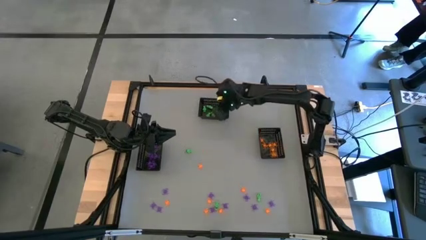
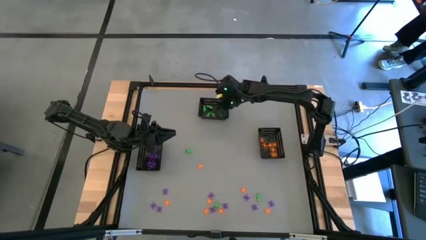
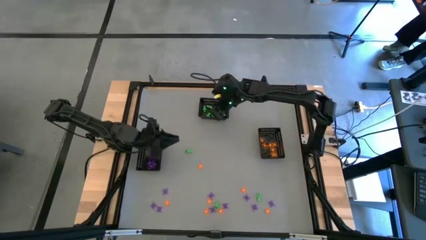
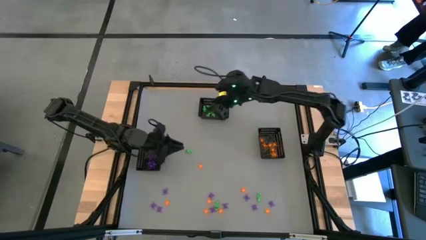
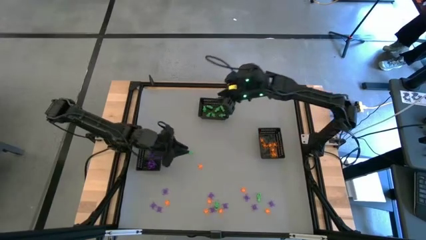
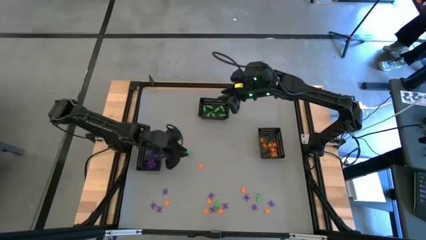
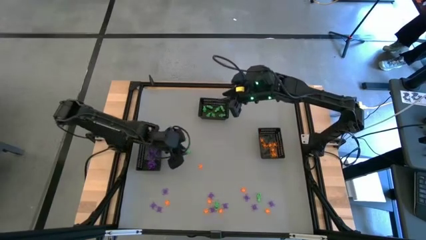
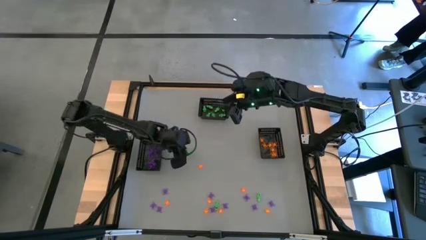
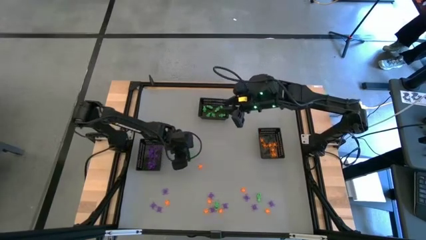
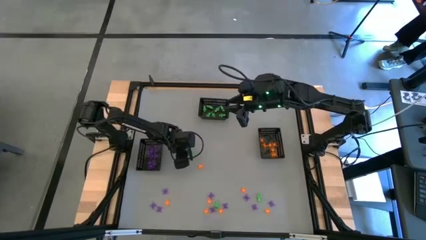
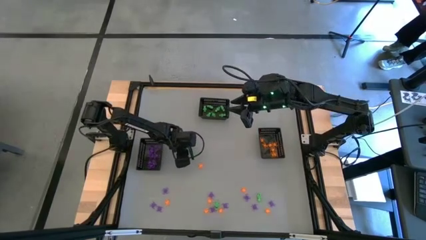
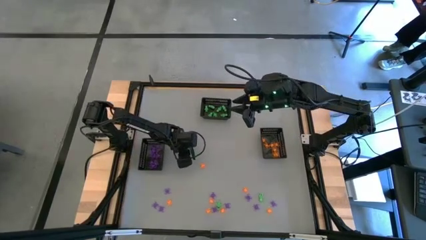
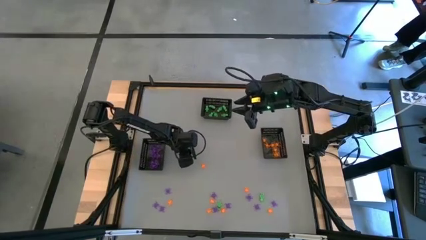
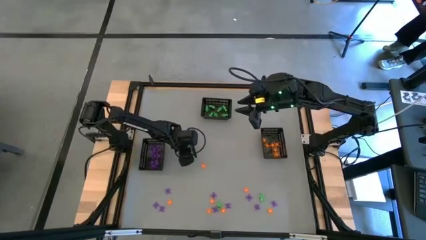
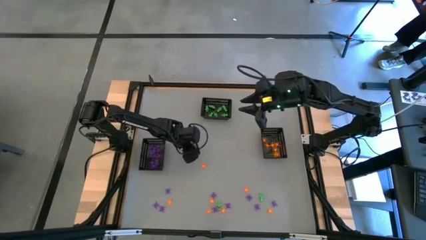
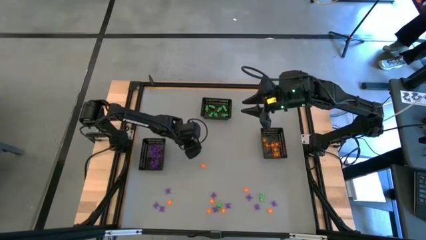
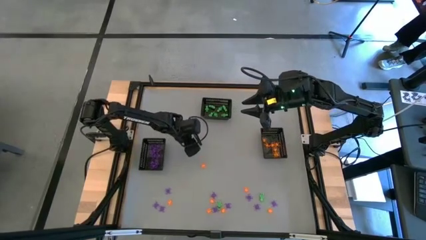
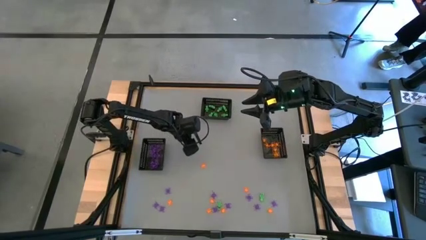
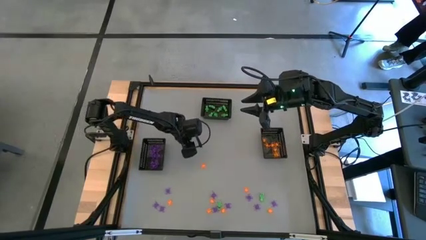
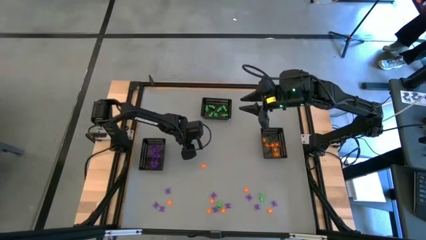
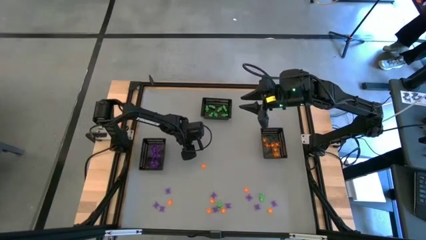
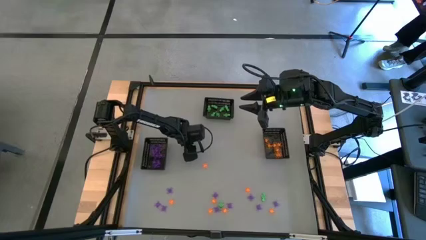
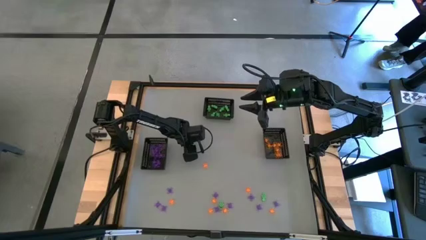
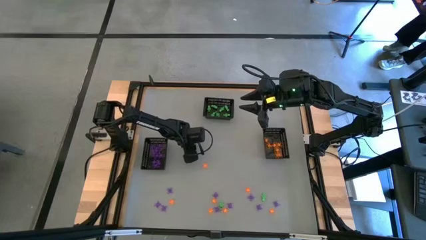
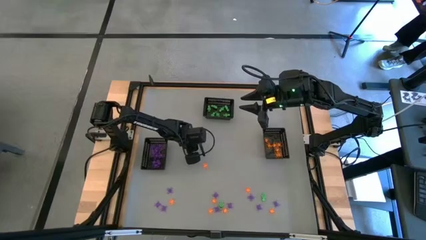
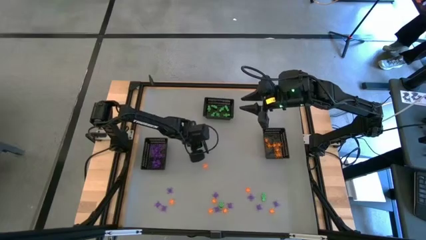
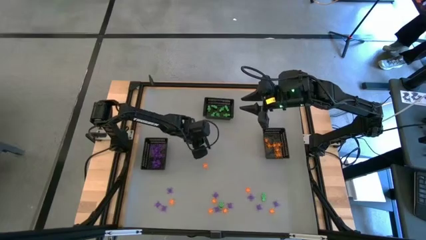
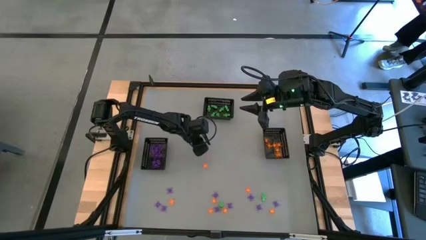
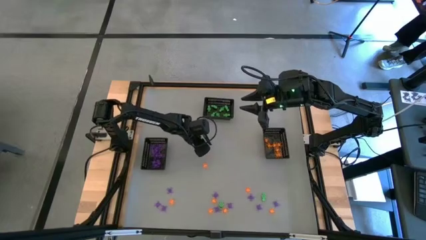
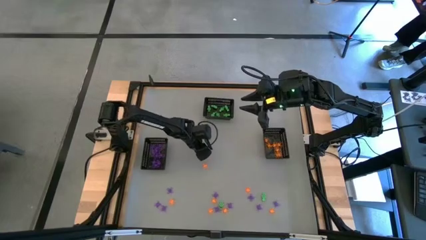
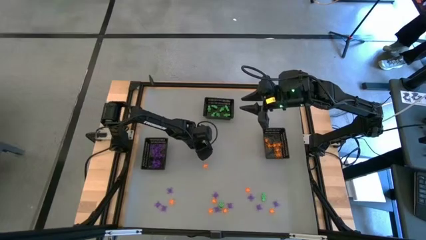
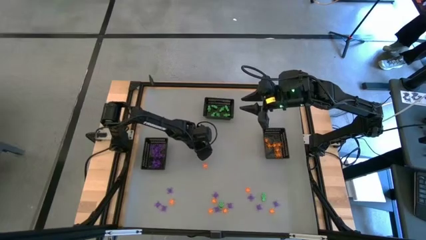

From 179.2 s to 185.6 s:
Task: Sort Halloween decoration
Put the green skeleton toy into the top bin

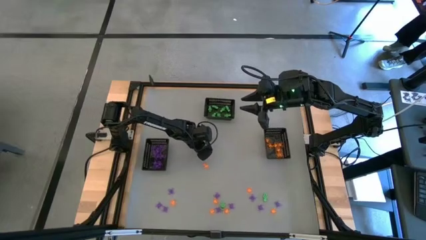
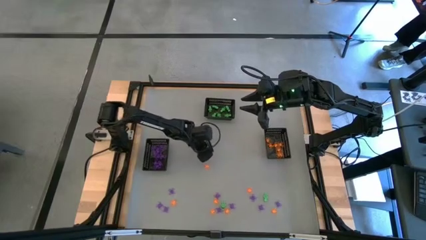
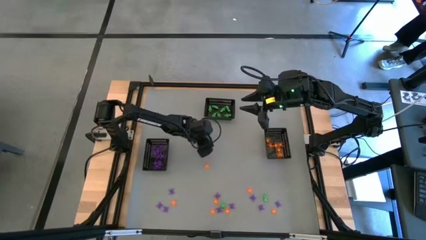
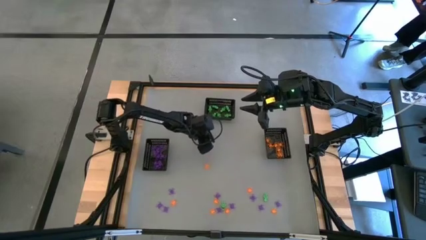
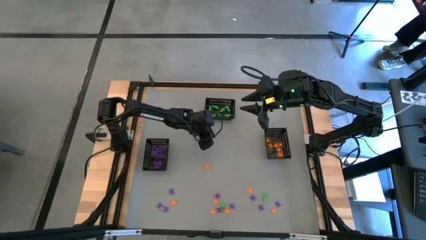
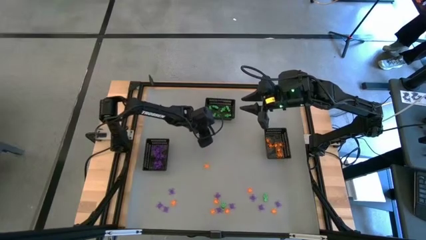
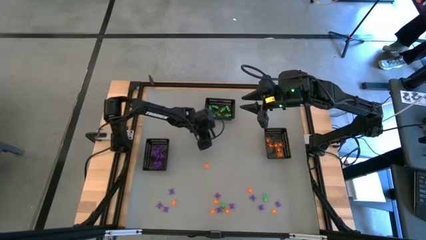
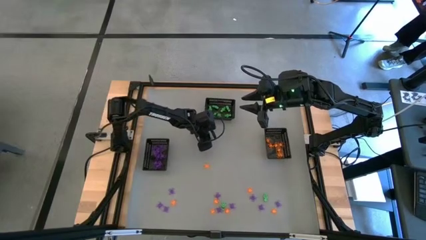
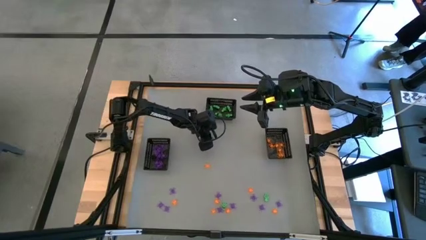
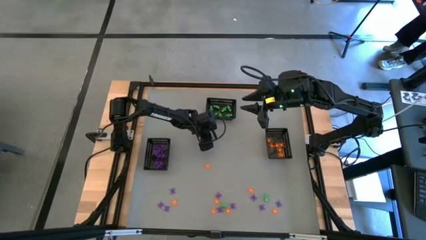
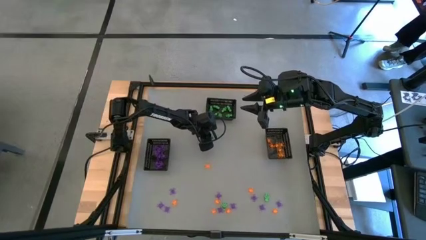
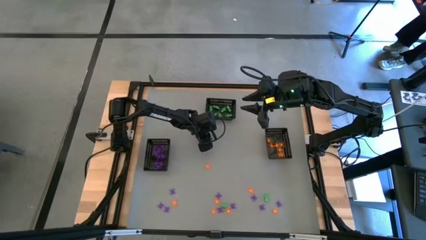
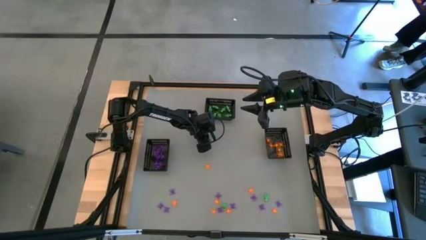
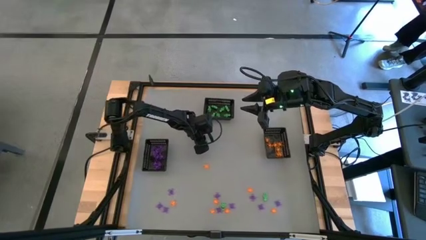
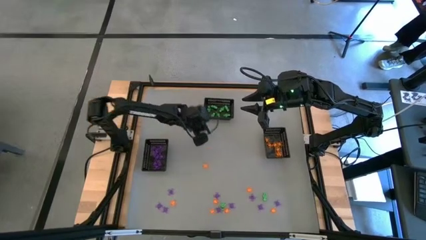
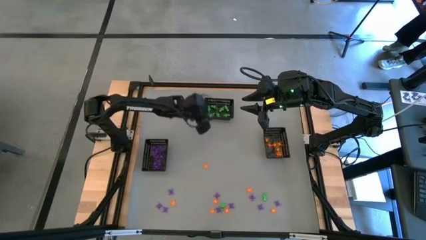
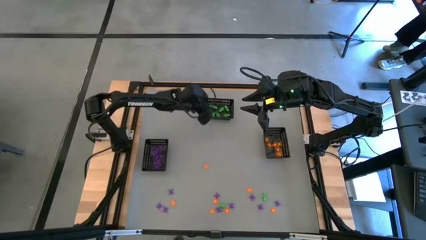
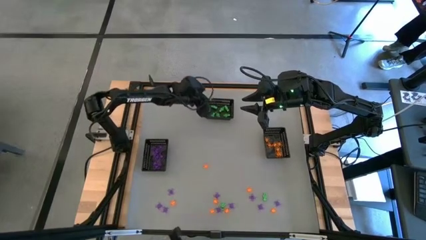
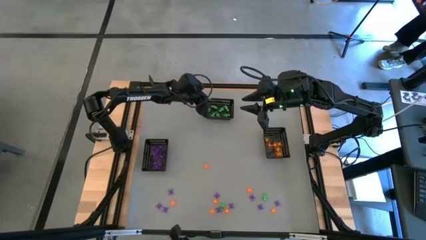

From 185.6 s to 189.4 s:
Put the top left green skeleton toy into the top bin

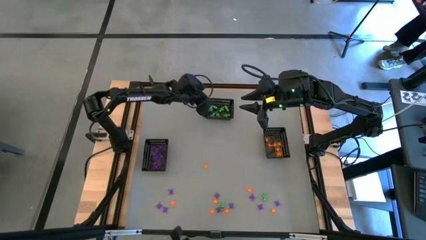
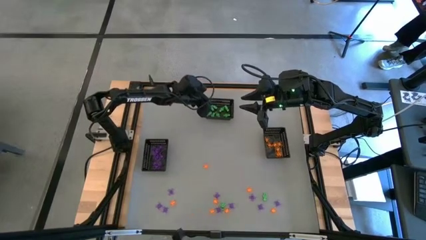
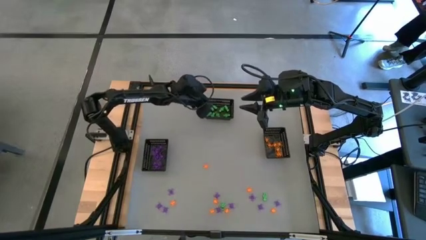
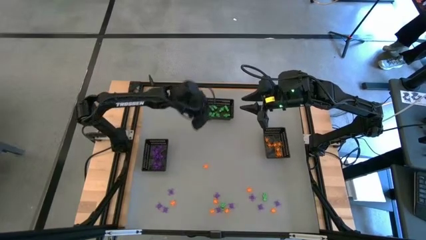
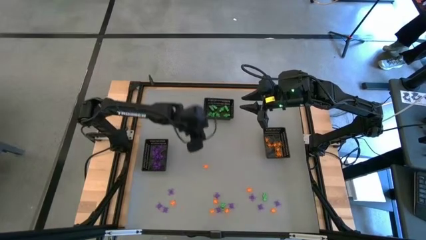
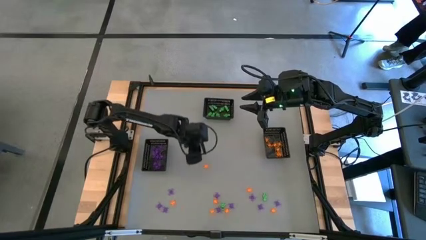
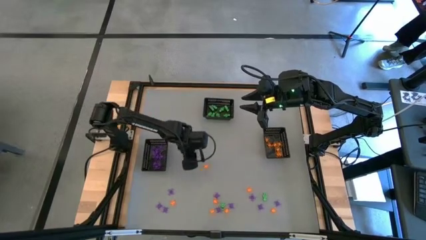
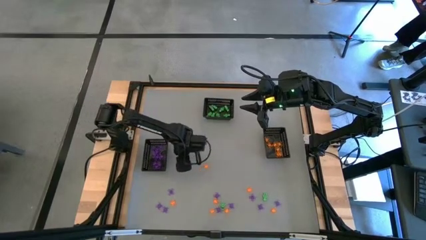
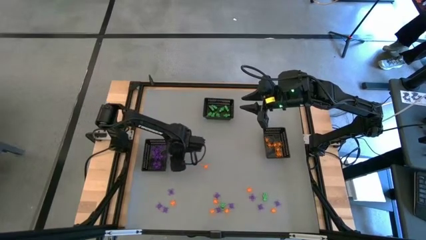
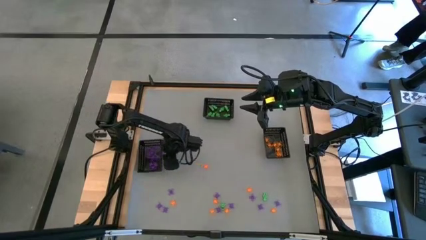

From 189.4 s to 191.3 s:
Adjust the left bin

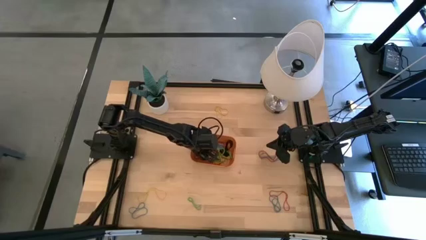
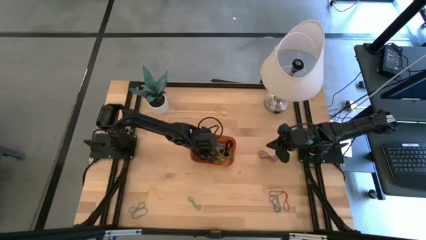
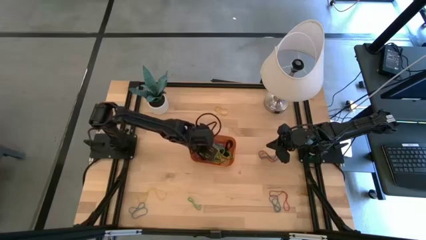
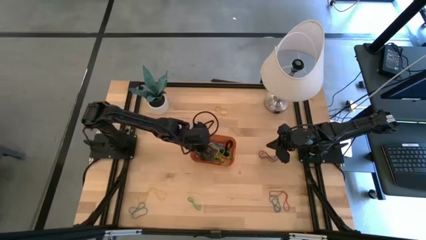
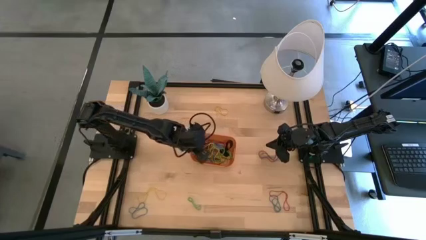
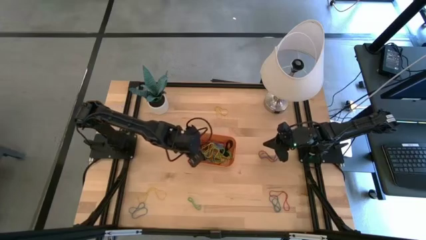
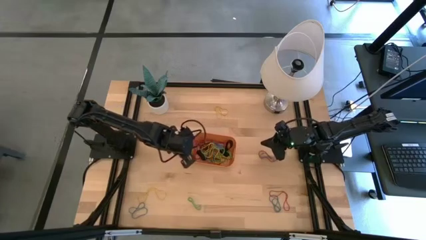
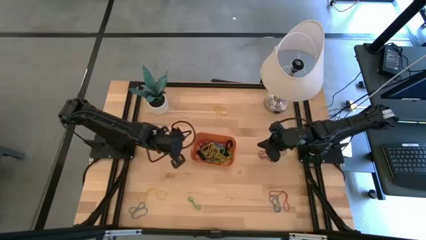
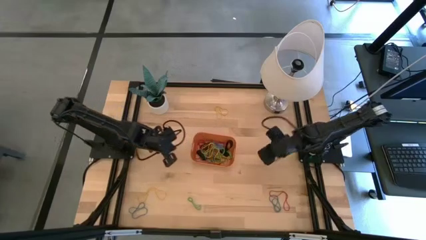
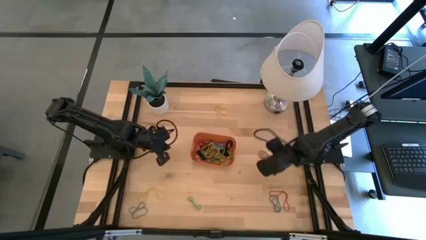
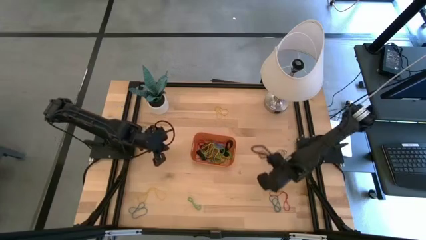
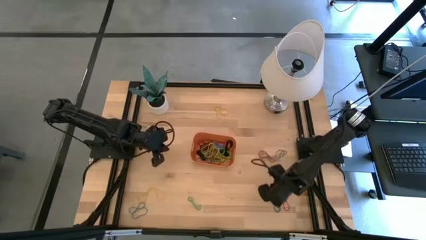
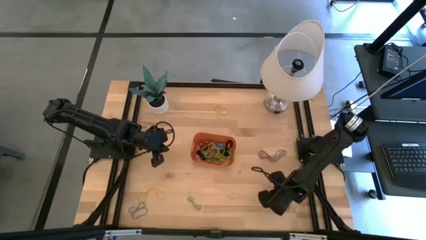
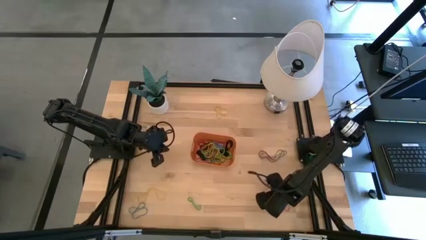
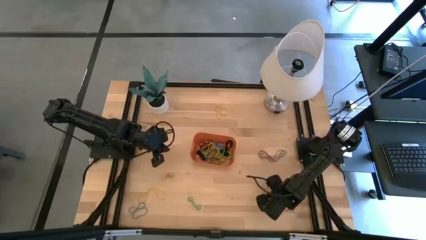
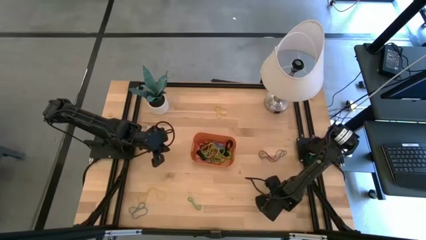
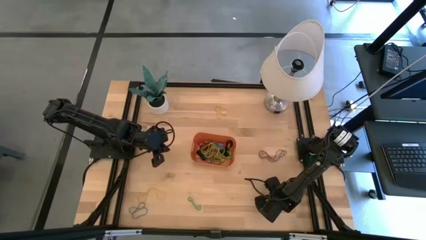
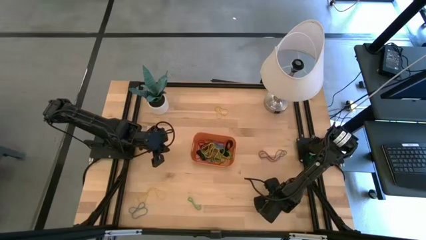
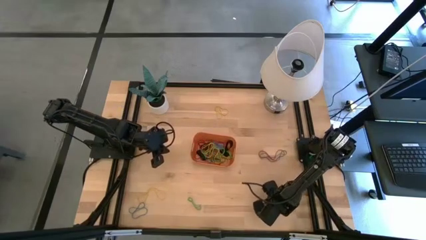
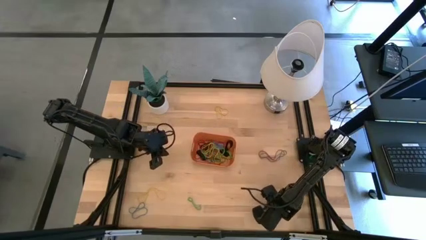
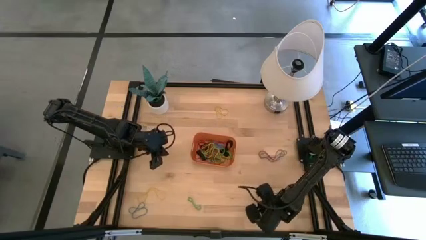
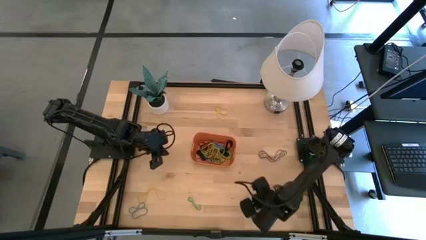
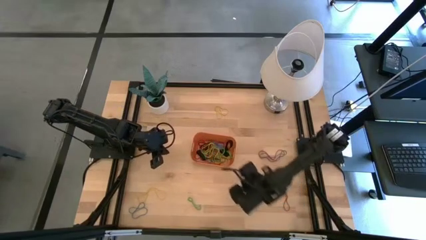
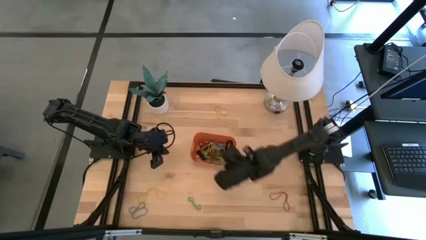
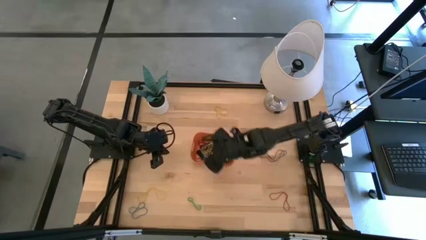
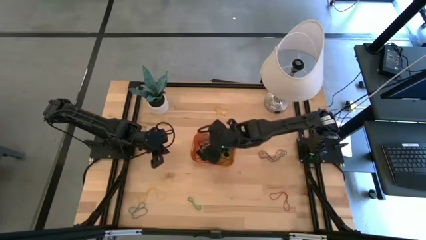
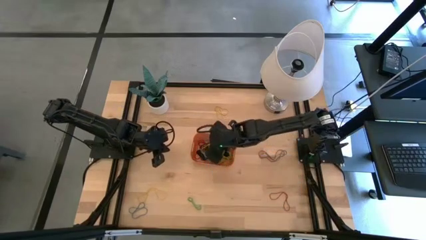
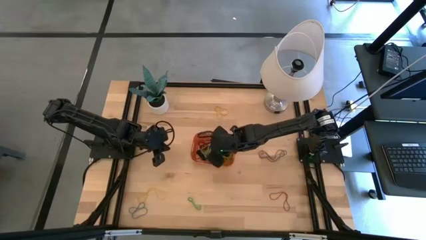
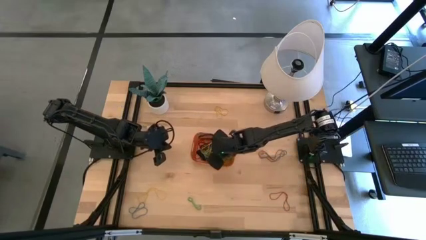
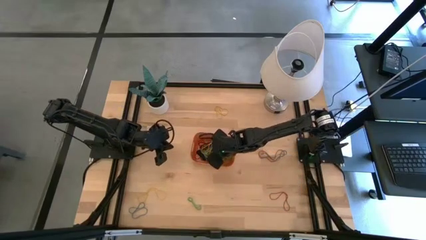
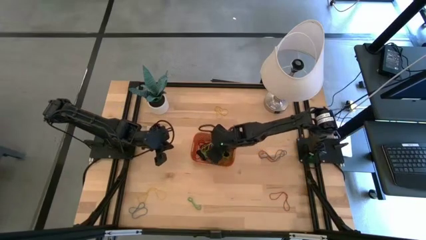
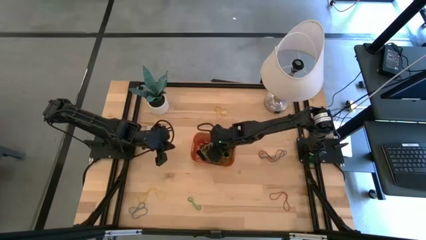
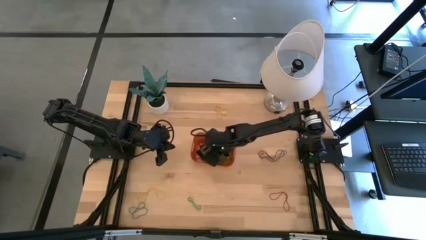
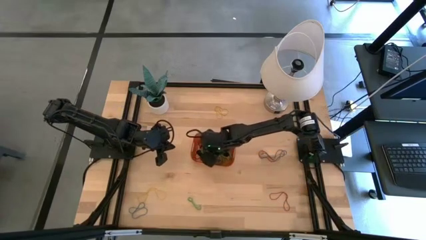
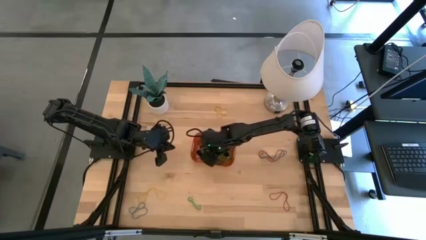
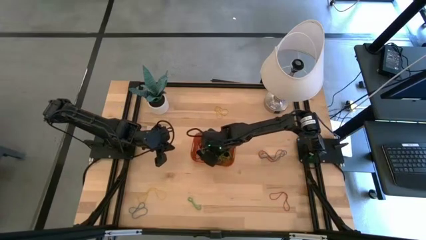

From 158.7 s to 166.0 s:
Task: Pick and place rubber bands into bin
Put the blue rubber band into the orange bin
